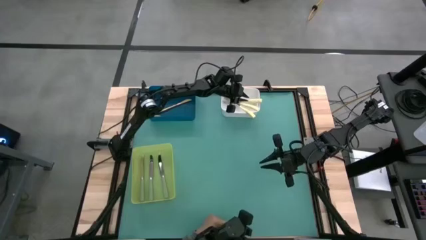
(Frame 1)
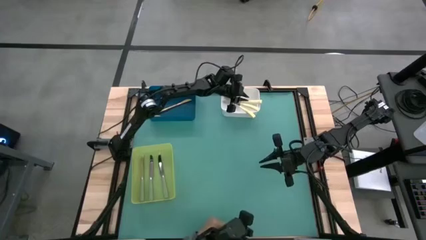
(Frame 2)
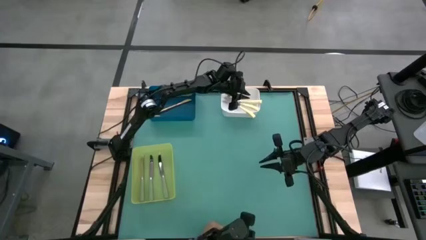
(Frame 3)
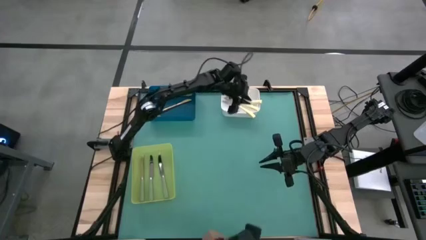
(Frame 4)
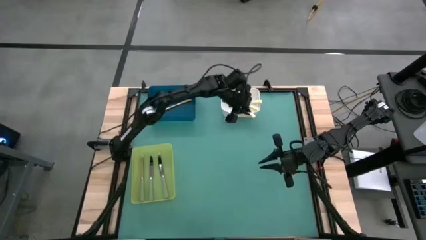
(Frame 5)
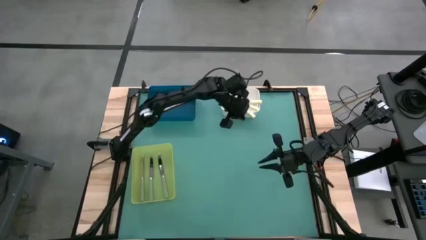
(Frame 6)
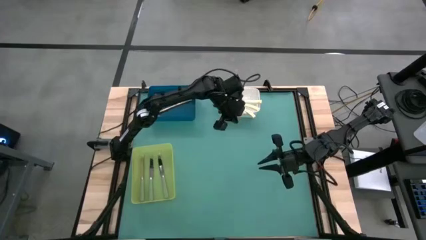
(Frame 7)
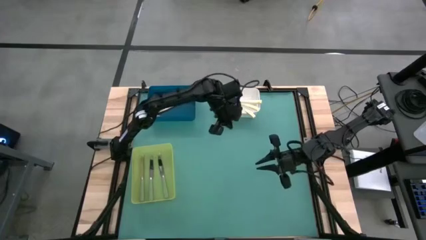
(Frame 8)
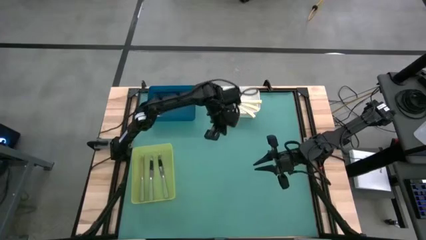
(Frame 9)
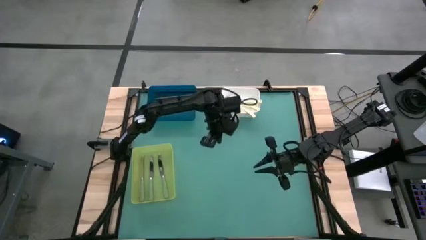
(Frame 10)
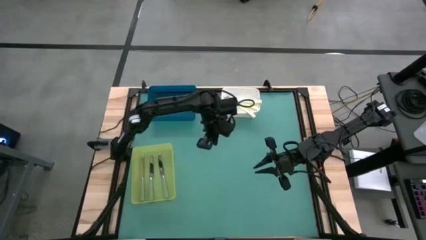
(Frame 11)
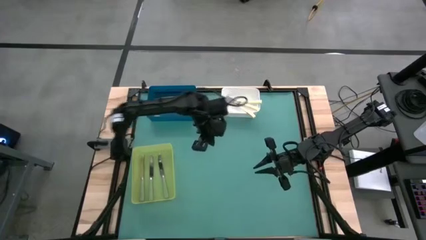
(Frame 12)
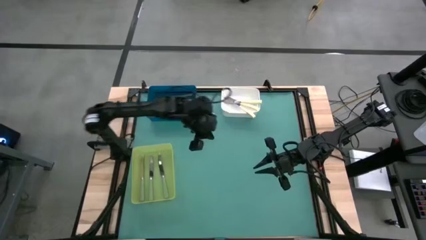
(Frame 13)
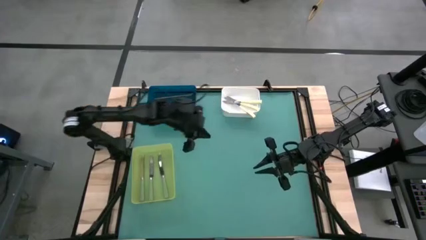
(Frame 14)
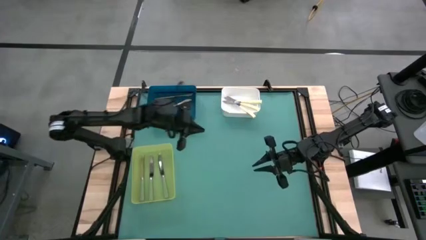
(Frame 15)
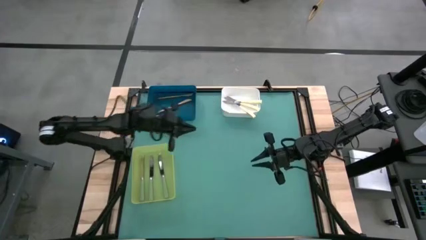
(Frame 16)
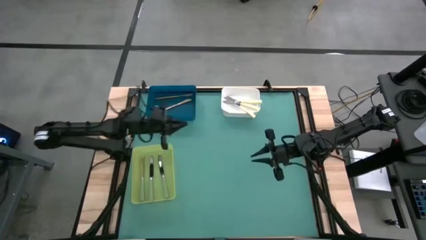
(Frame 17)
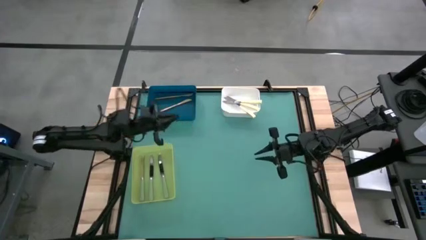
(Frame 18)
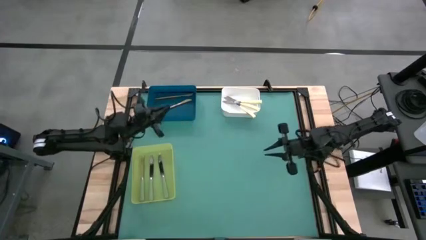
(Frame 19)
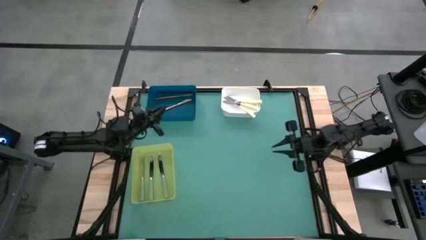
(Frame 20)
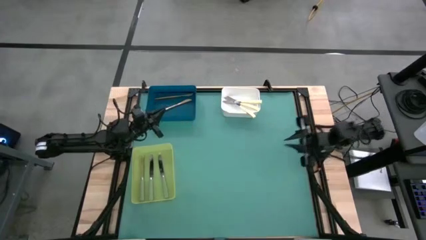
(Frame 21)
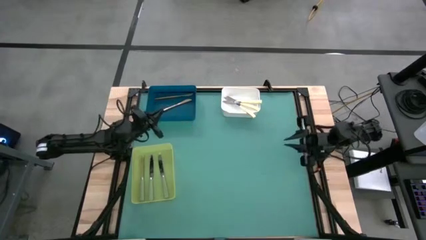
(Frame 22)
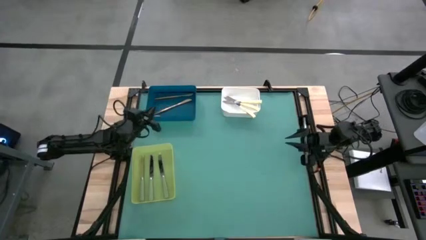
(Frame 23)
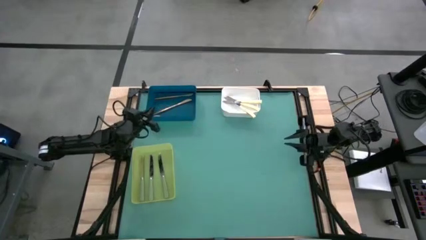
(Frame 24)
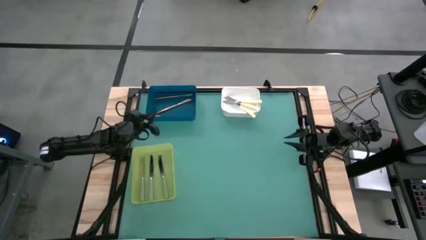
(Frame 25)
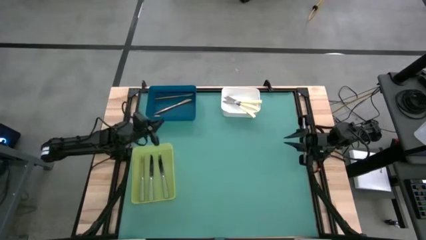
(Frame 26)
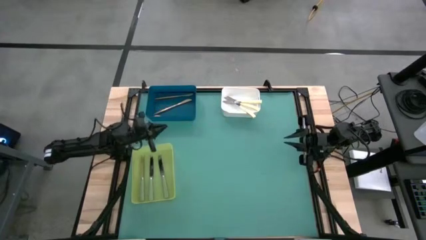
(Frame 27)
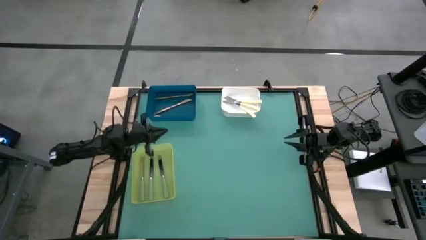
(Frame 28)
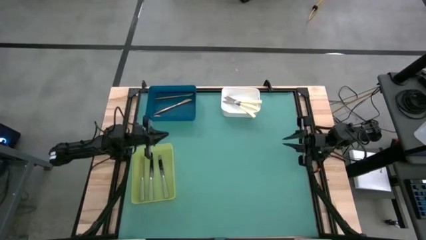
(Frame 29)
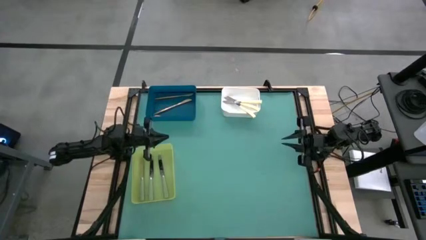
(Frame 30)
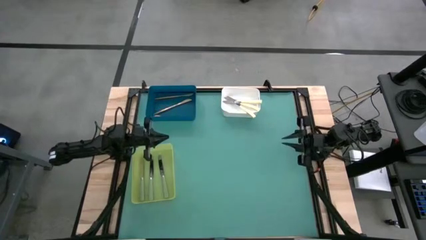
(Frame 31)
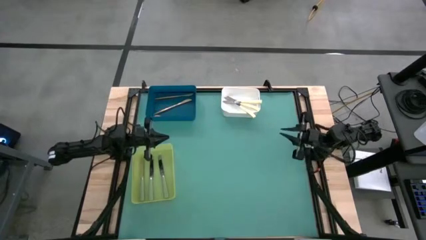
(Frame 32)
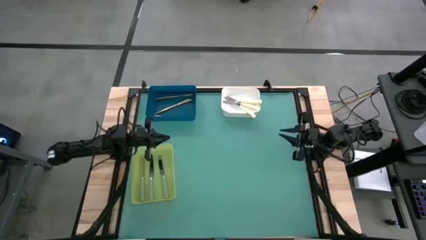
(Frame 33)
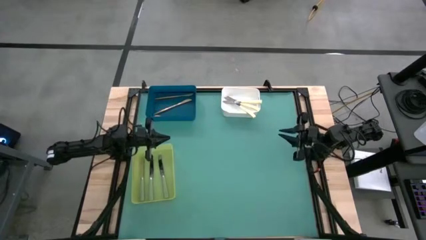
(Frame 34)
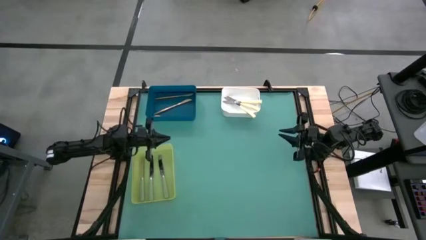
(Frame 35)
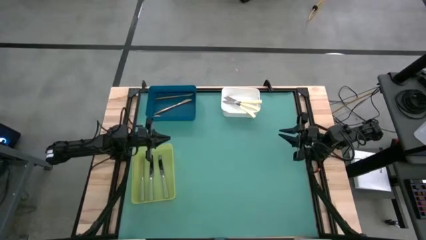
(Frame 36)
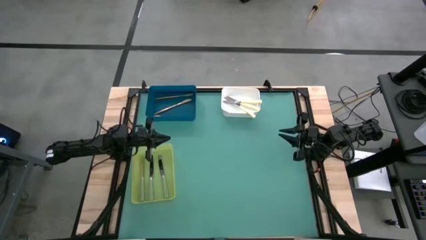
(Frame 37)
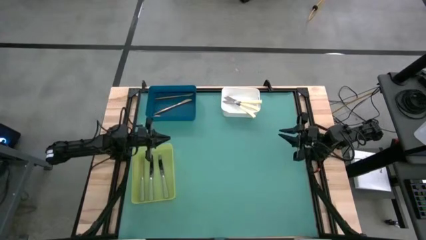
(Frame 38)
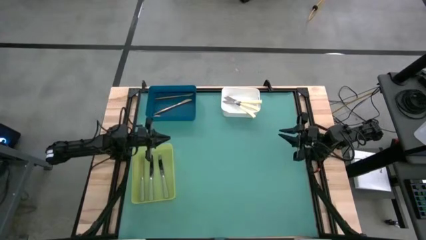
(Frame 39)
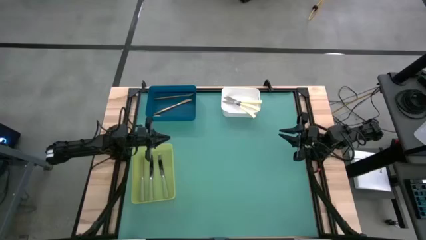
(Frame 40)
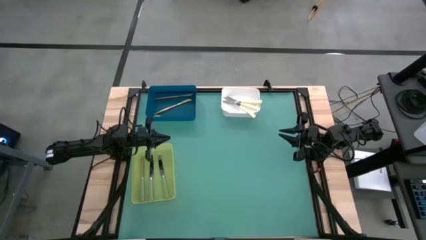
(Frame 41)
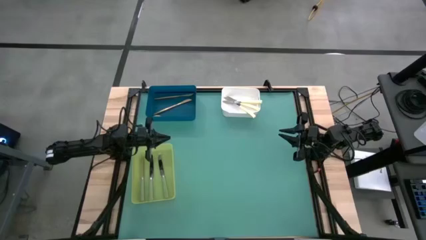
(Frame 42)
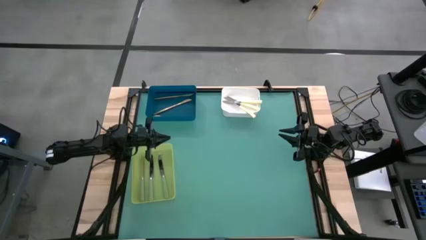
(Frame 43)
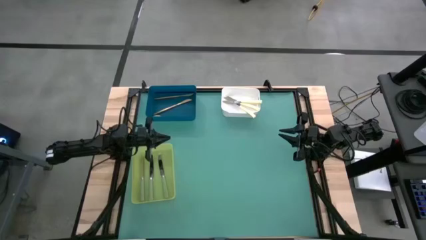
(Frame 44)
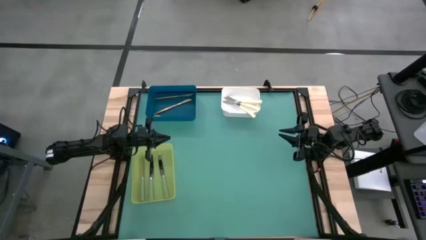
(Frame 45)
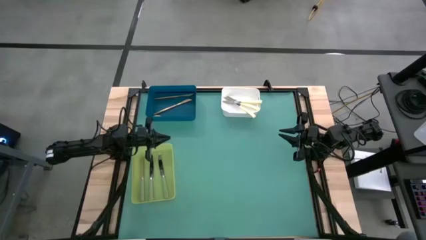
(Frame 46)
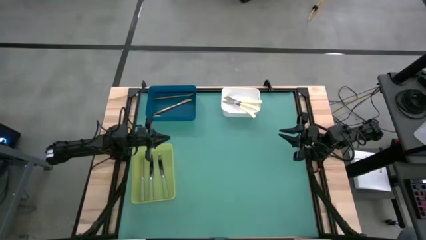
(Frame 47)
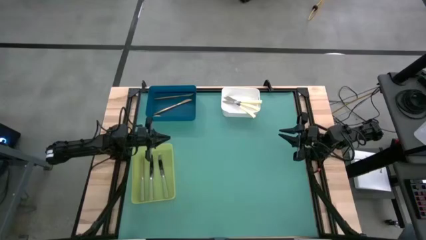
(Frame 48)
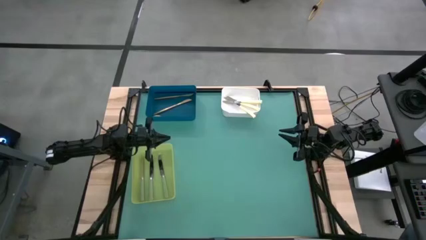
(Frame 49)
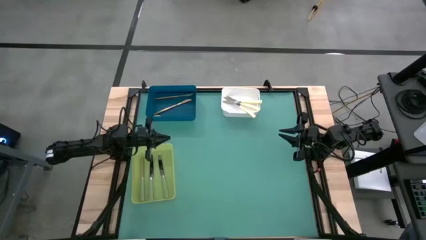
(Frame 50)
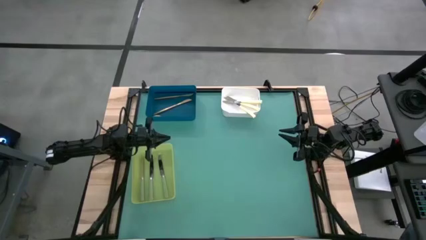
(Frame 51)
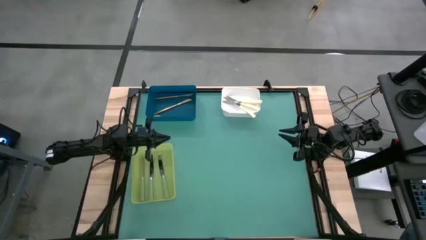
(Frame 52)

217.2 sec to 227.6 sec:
Task: Sort silverware by color (type)
Return to Home Position

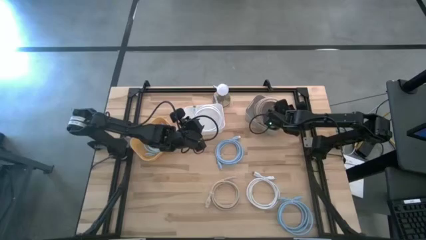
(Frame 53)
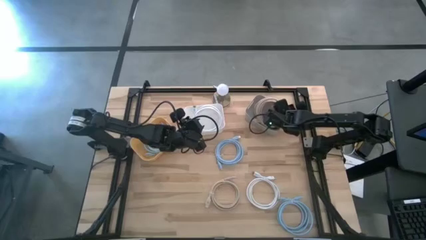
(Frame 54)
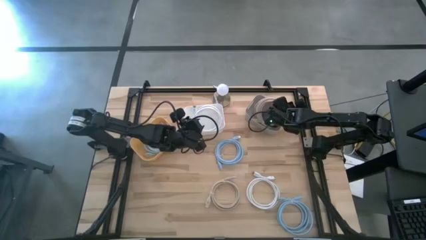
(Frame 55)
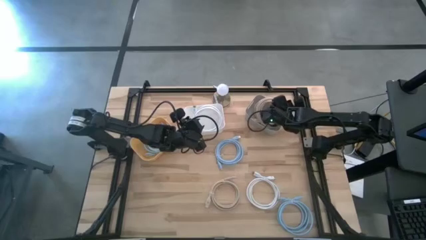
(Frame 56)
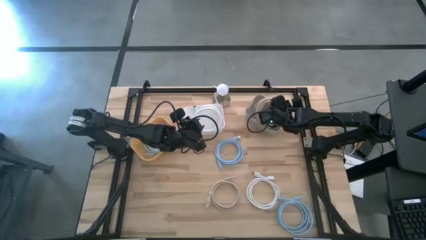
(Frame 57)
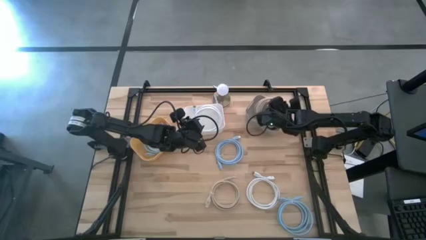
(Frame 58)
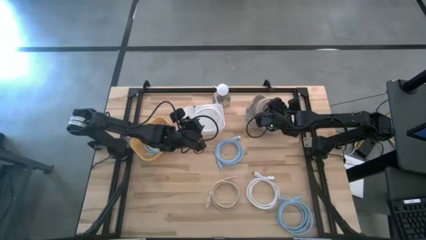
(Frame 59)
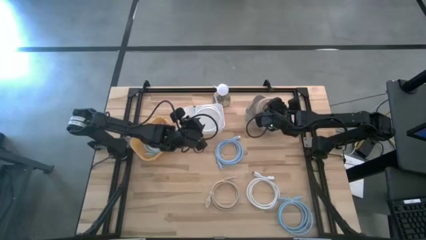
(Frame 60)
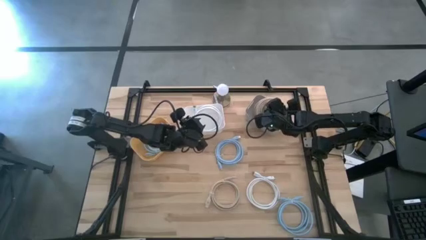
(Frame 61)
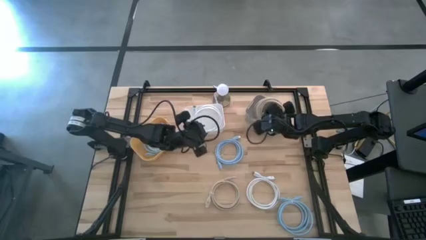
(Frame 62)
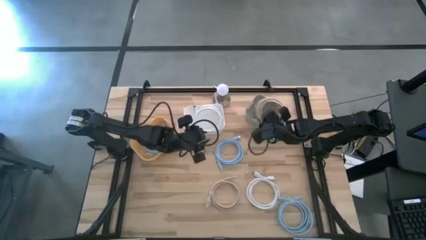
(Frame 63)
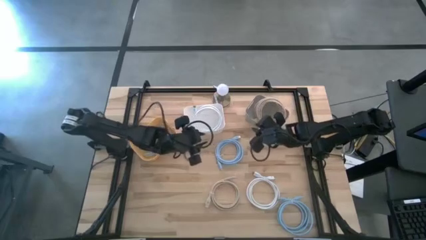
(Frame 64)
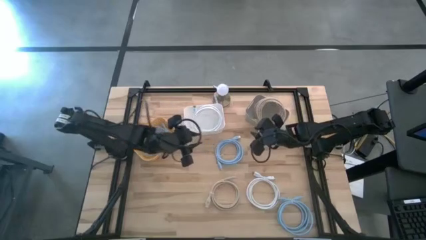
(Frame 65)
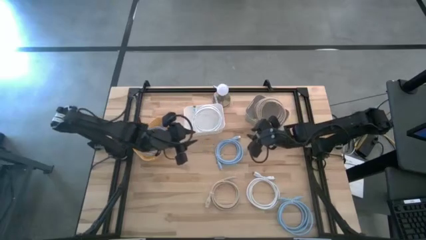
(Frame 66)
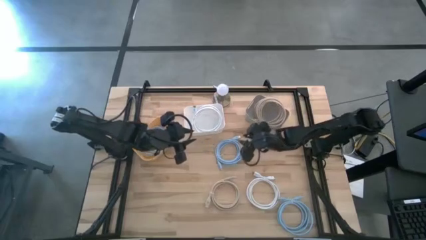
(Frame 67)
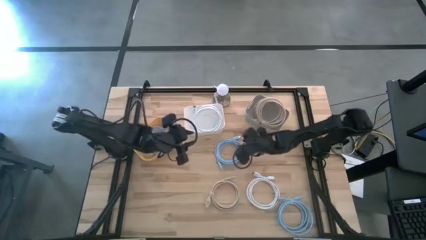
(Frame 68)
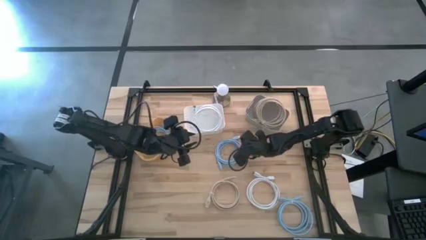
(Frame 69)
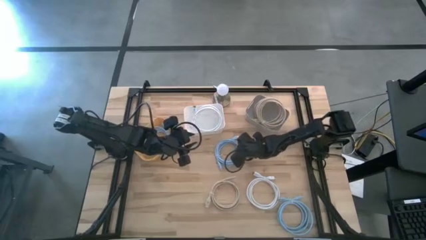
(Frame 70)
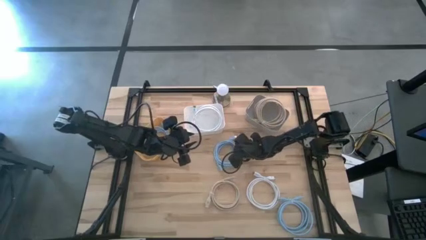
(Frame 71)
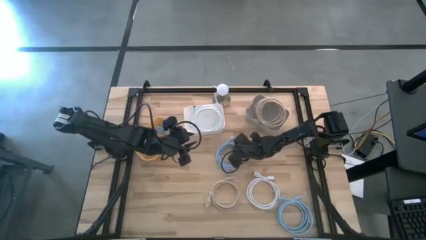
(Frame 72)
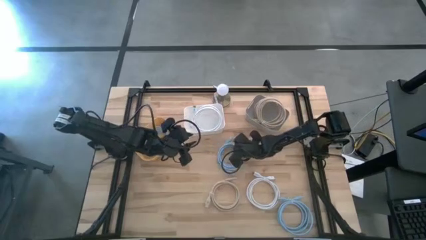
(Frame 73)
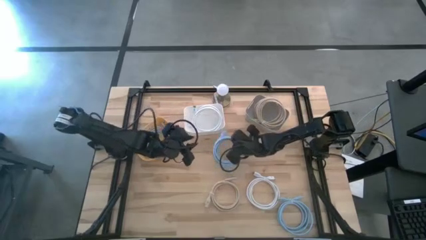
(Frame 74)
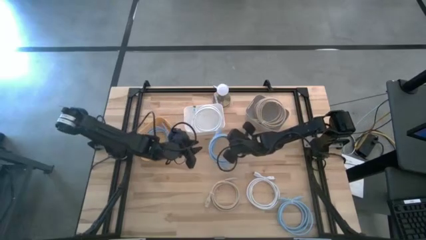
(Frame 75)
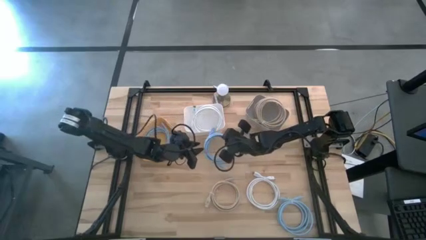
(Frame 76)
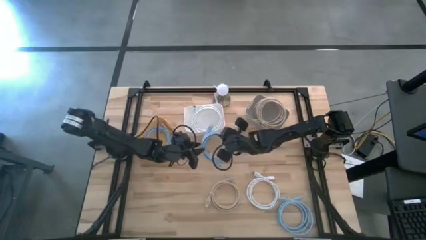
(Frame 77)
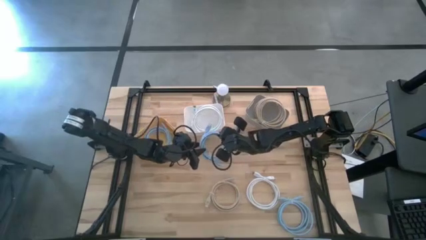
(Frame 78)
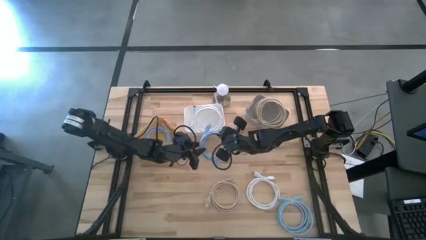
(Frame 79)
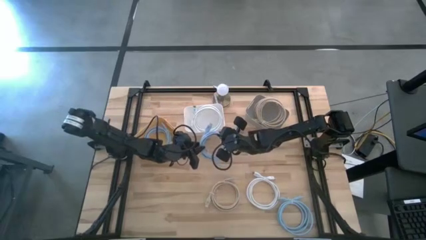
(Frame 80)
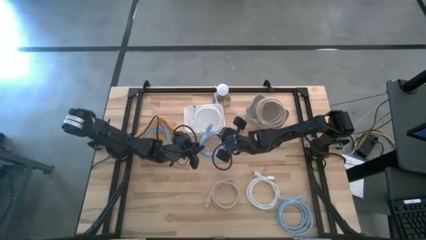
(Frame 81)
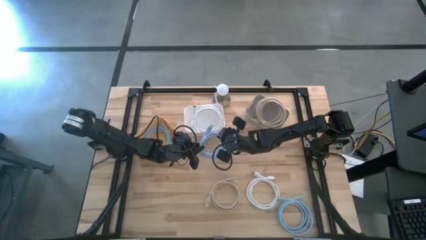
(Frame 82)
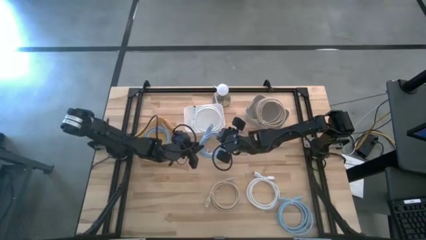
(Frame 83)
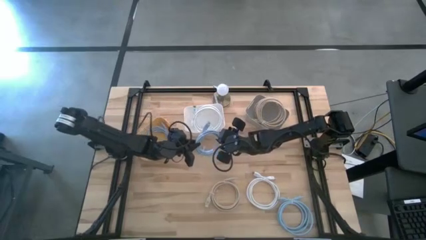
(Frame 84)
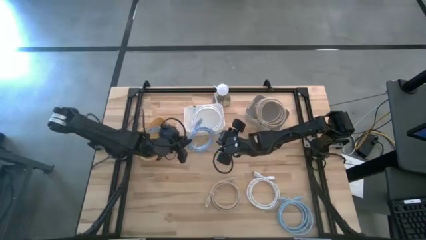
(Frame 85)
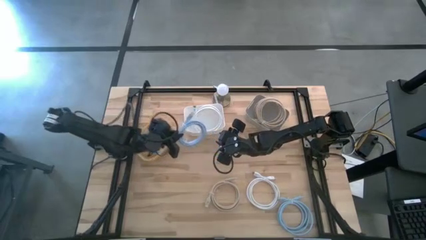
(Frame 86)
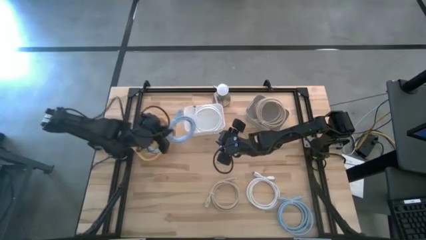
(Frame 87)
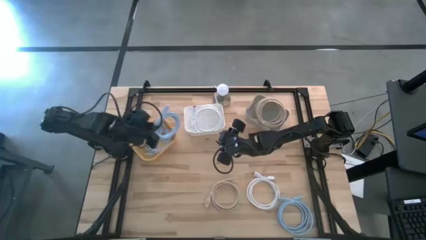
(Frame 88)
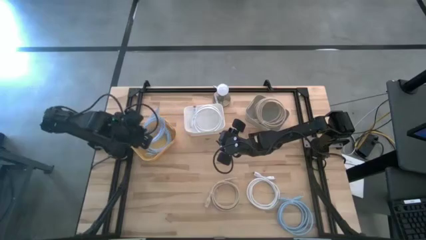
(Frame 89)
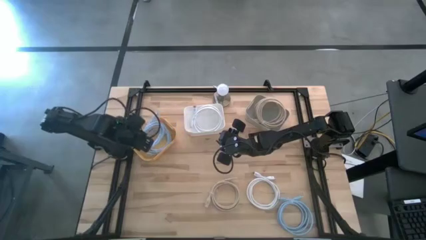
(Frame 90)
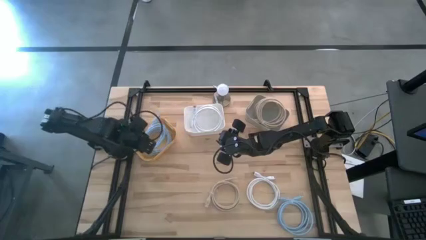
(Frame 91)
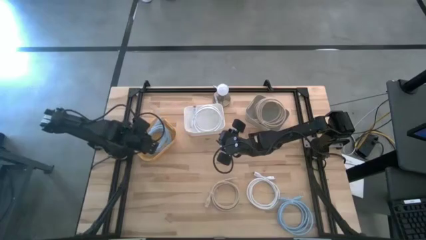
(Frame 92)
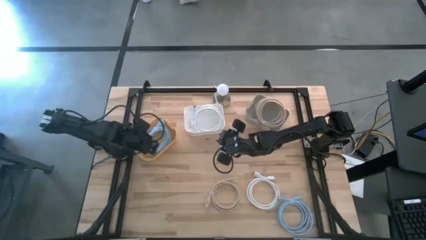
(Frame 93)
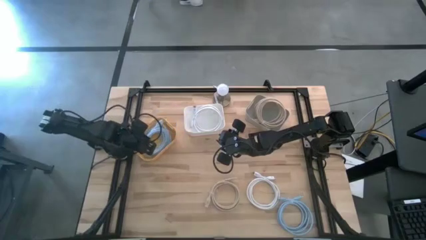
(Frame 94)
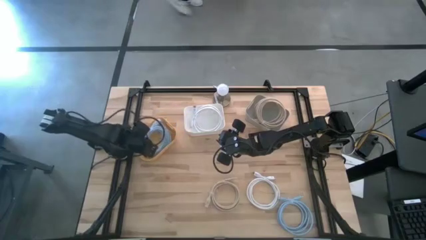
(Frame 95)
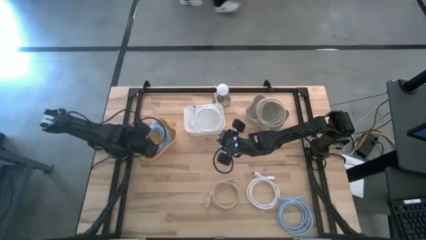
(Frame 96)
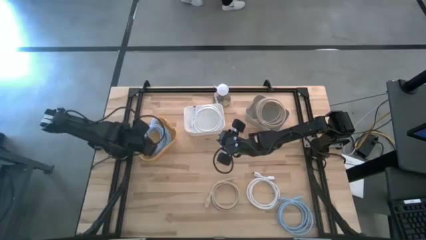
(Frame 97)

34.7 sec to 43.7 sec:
Task: Sort HDMI cables
Put the top blue hdmi cable into the yellow bin
